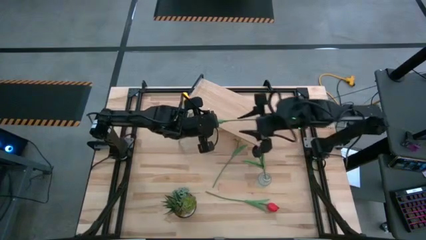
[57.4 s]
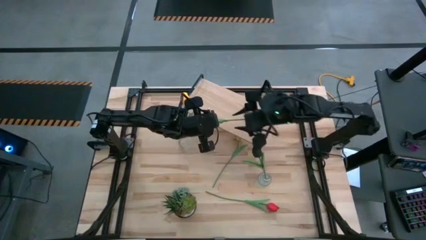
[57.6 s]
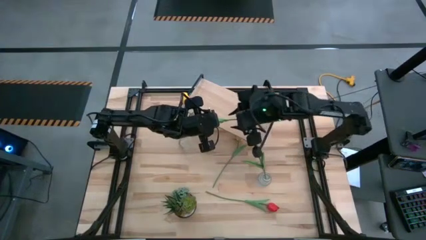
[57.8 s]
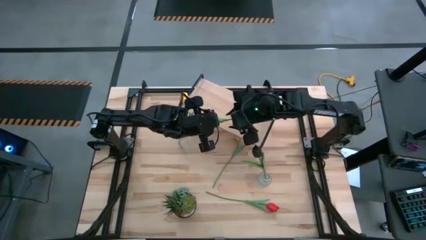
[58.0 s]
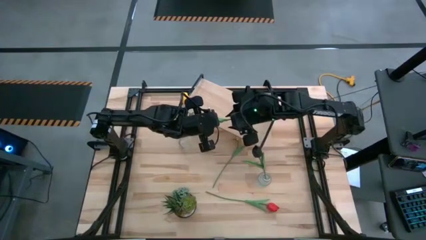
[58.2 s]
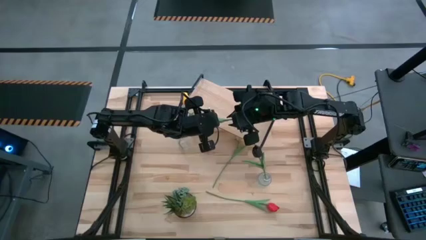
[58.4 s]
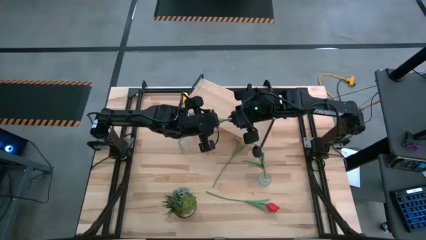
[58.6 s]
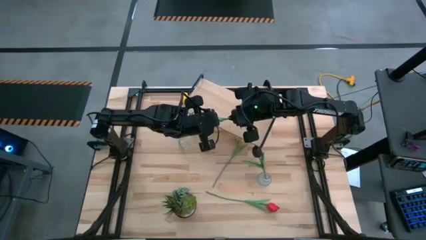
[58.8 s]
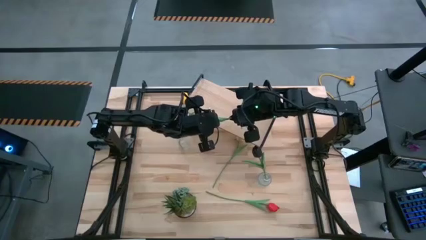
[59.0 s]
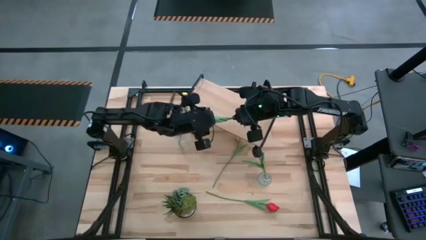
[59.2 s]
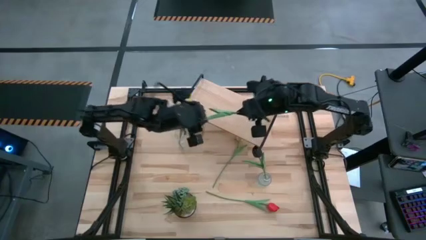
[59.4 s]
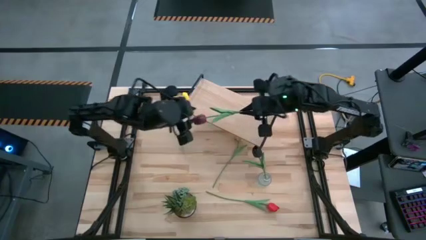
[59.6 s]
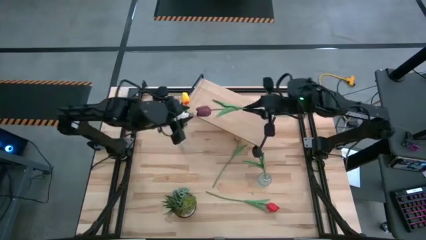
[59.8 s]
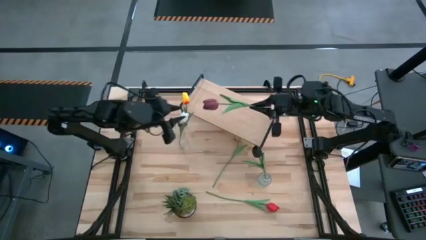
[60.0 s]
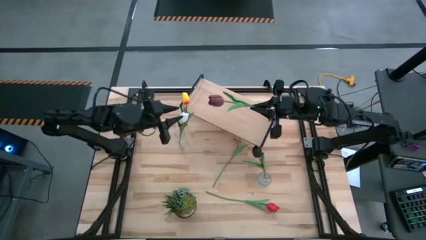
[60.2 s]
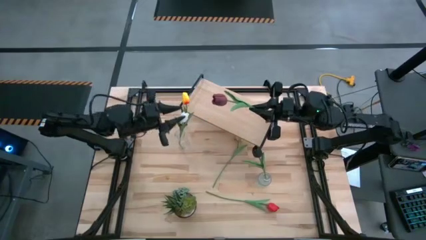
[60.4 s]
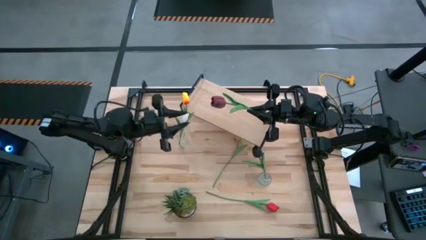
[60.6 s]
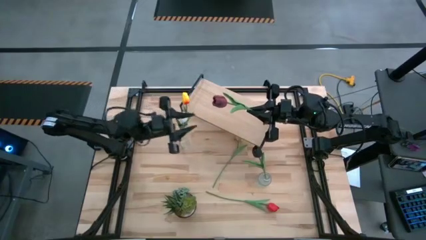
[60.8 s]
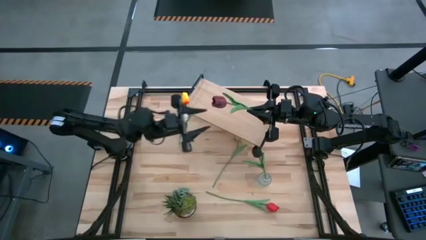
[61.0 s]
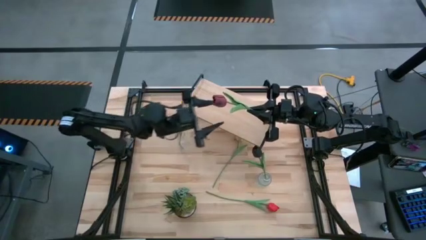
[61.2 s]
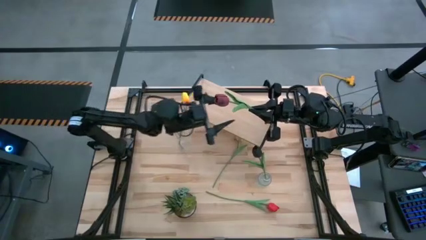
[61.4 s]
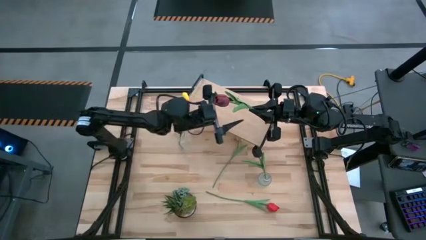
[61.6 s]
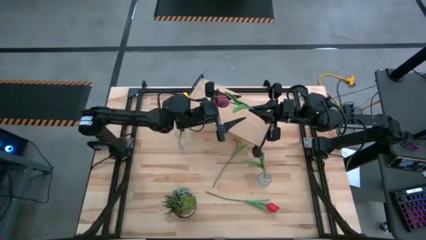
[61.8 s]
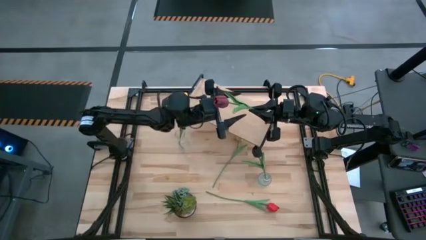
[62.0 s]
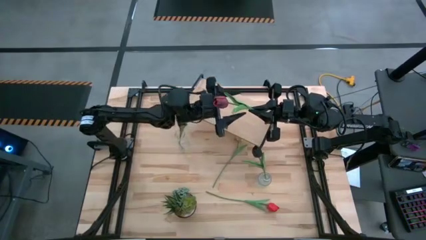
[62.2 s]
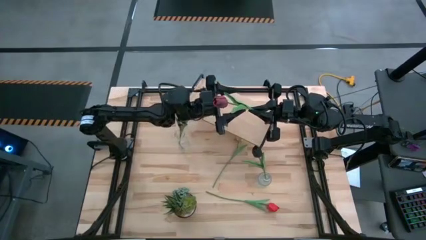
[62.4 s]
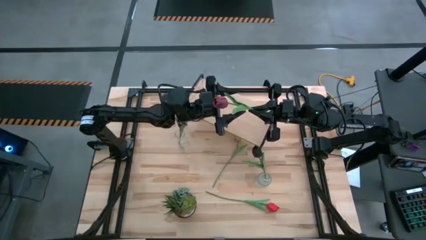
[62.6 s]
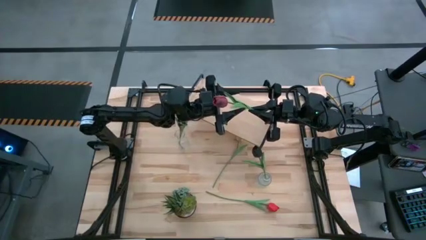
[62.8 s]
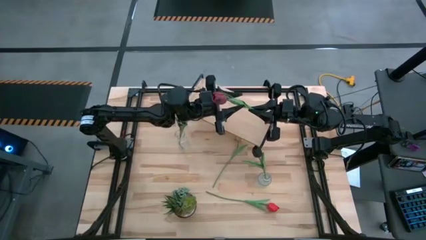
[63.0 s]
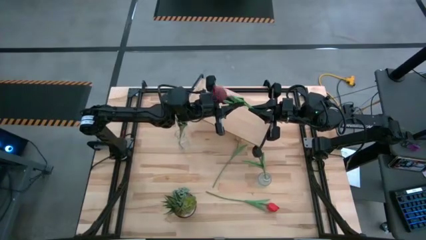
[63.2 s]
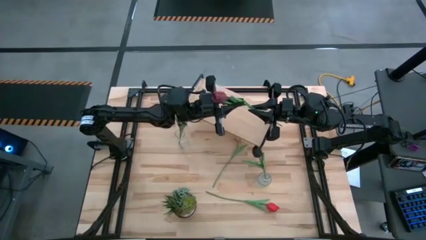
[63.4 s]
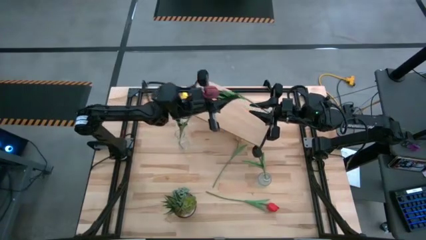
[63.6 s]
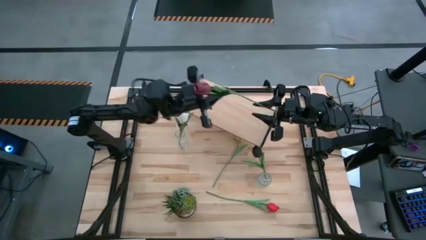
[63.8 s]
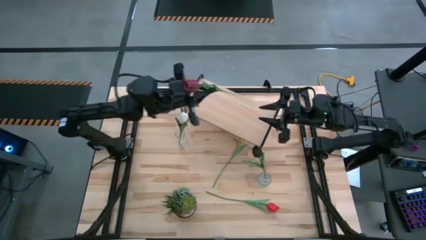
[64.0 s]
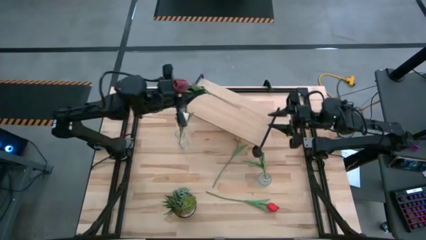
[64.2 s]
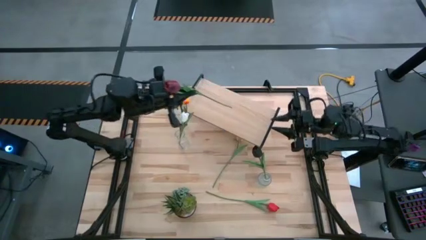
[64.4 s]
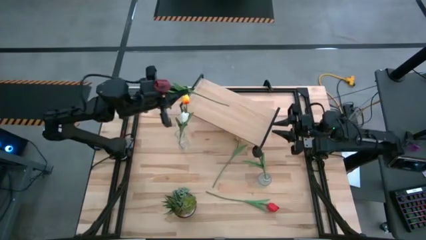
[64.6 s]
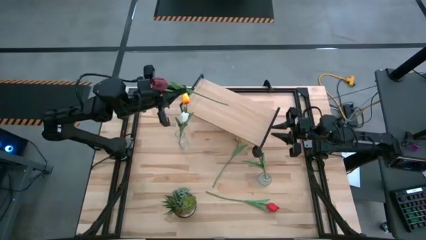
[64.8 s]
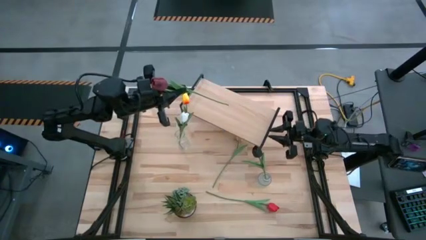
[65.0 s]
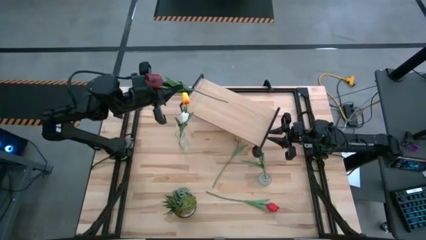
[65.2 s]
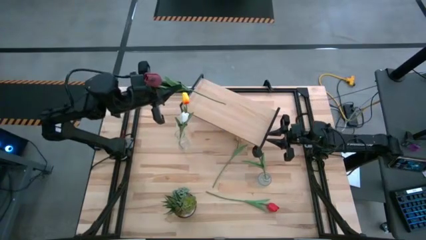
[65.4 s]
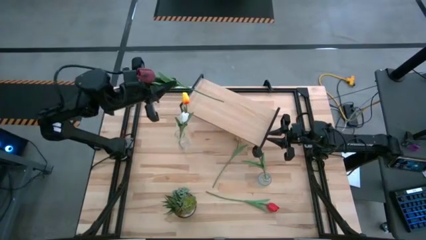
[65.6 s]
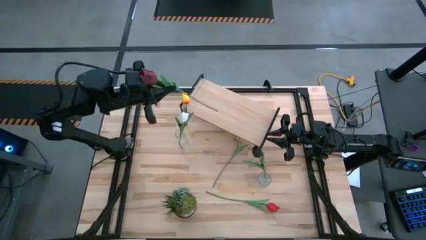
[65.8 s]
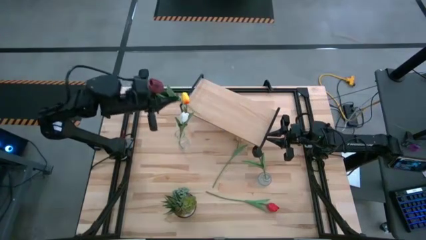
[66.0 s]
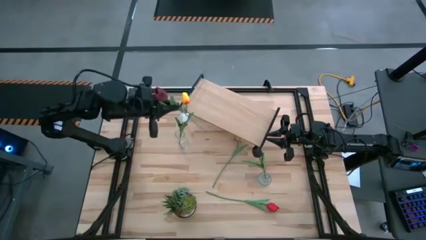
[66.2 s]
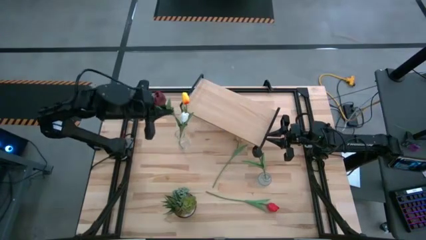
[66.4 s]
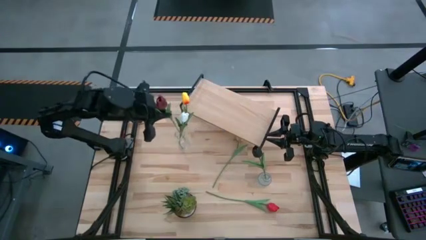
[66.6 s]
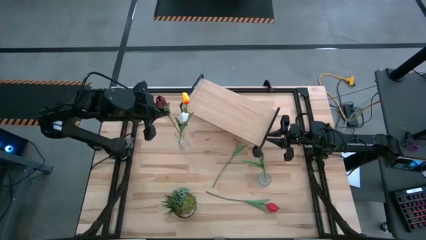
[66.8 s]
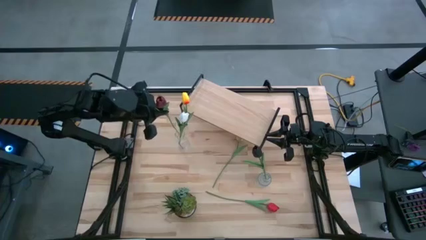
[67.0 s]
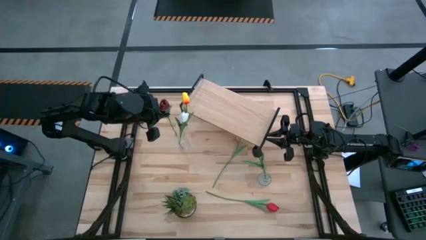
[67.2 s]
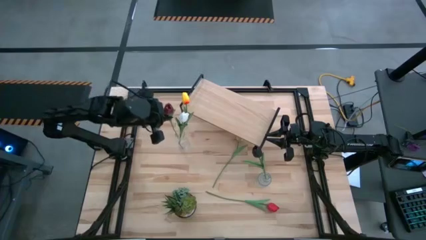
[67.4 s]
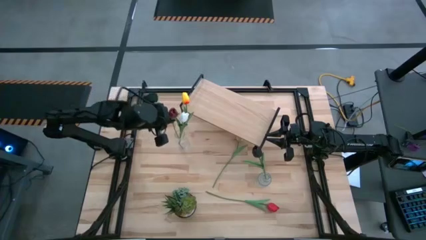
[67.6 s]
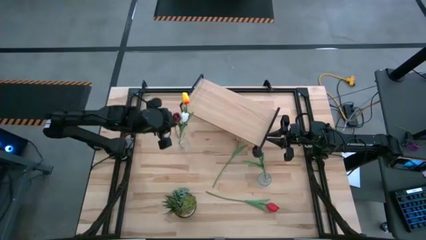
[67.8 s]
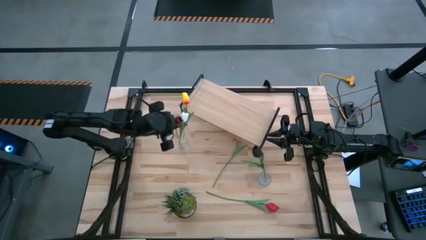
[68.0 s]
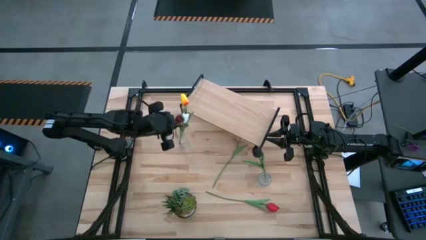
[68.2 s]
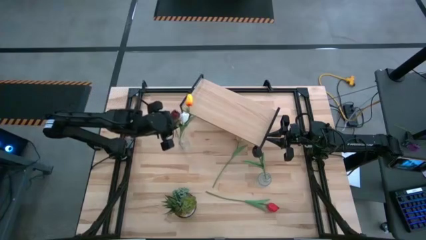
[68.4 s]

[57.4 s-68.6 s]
Task: Pick and place flowers into a vace then onto a shelf
Put the dark red tulip into the left transparent vase
